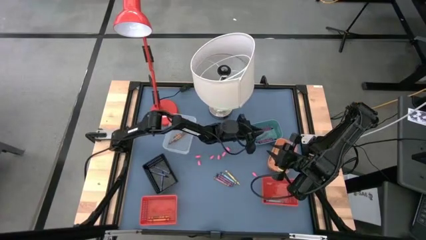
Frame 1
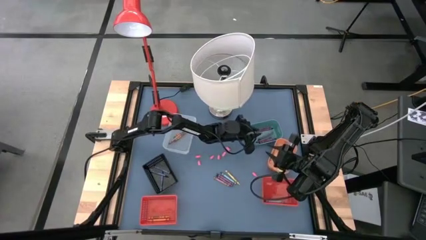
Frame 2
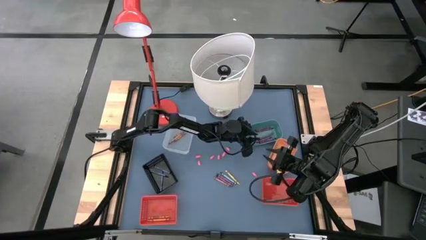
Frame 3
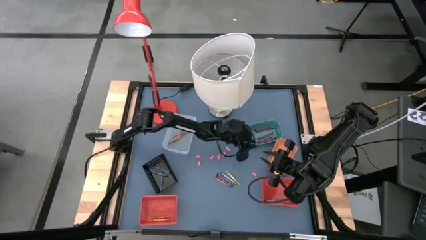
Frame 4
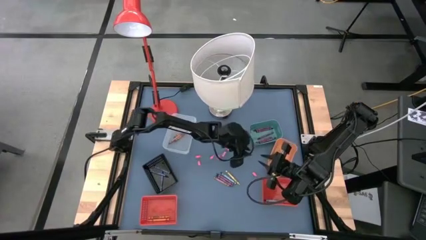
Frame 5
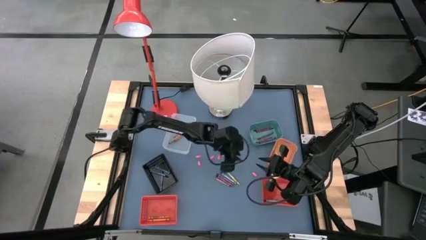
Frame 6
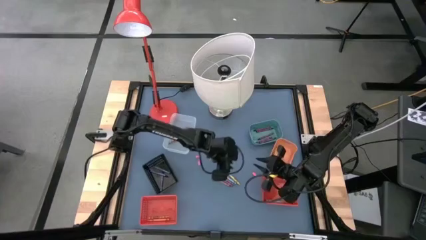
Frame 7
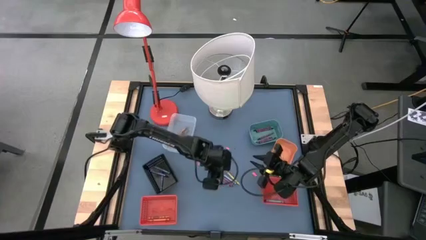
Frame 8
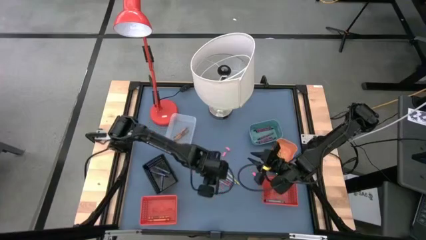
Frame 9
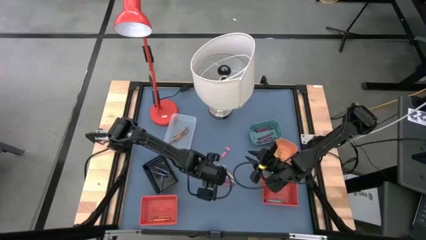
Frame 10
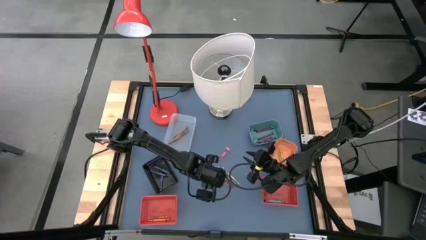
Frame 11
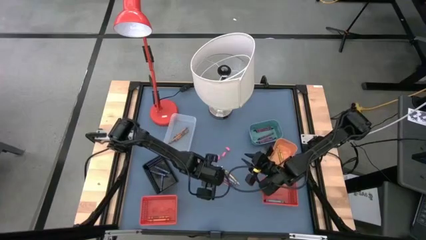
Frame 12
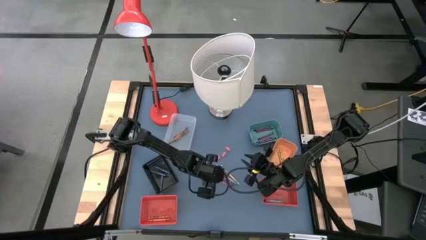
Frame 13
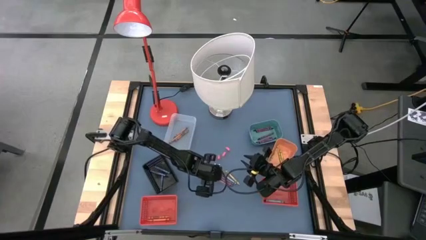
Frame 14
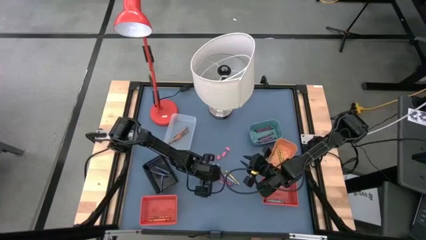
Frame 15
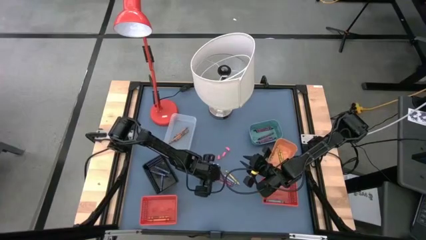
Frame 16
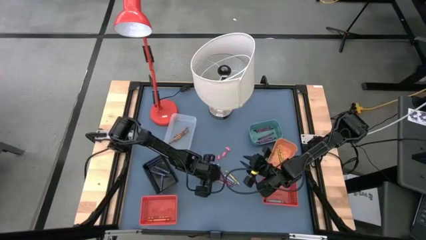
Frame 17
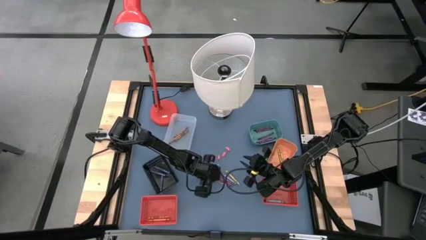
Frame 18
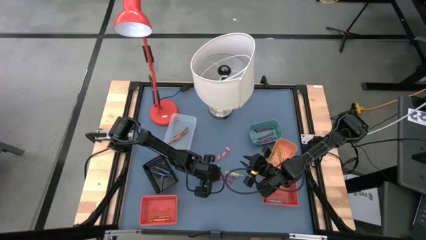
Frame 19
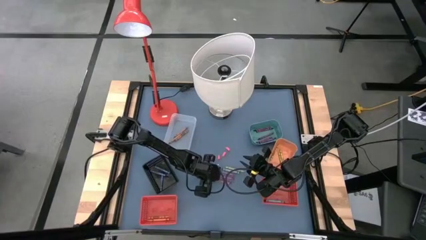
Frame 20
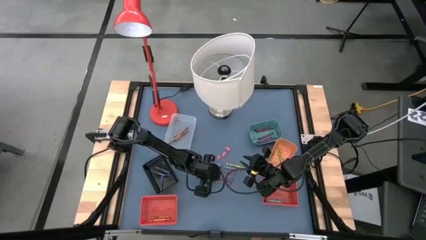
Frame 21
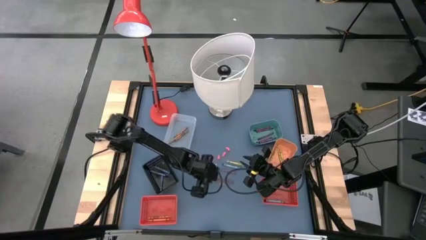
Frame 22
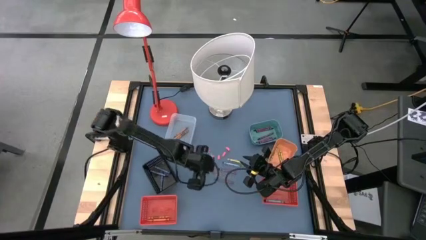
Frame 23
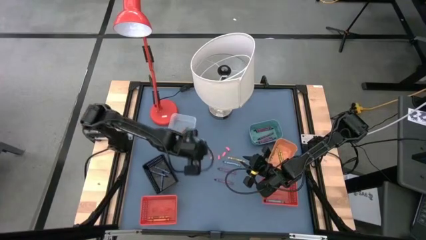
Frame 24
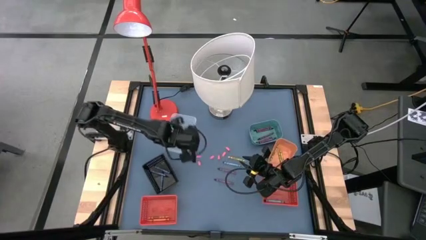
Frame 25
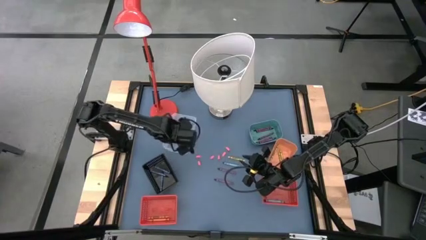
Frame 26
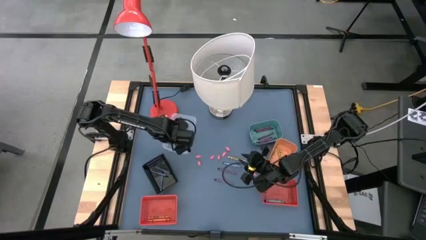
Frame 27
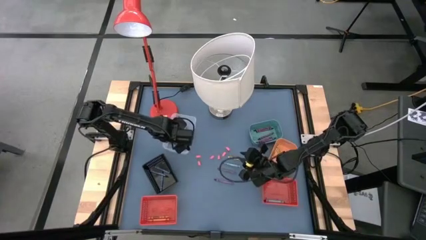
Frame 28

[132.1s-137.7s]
Task: Sort crayons
Put the brown crayon into the transparent bin

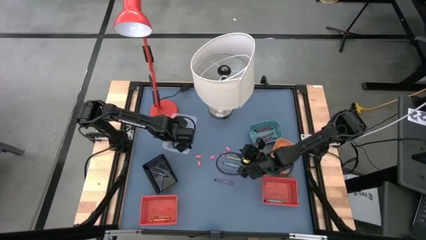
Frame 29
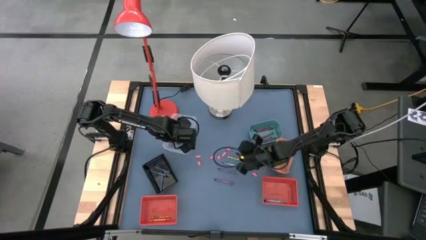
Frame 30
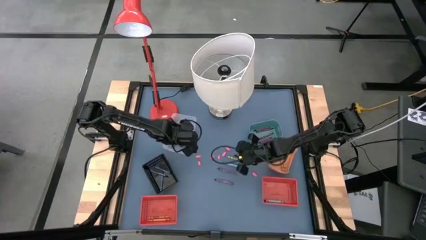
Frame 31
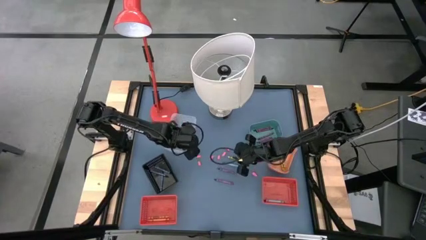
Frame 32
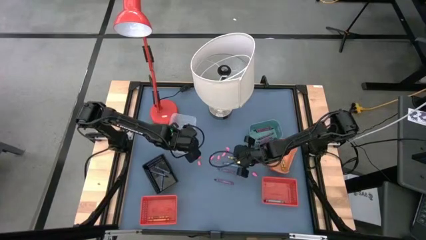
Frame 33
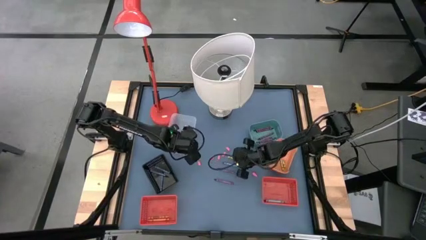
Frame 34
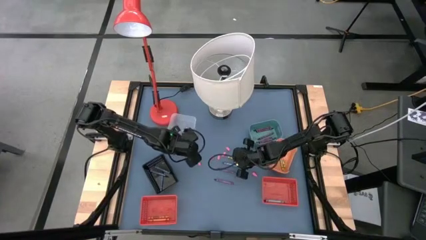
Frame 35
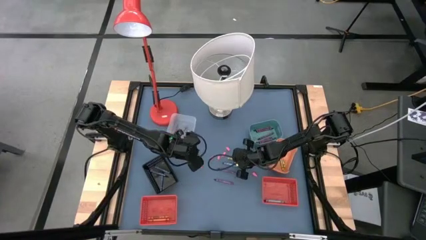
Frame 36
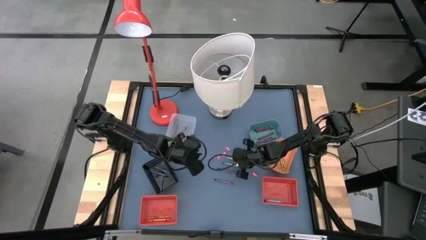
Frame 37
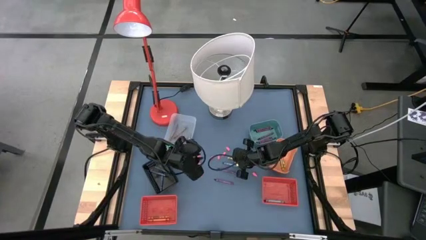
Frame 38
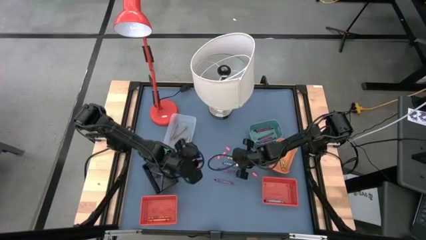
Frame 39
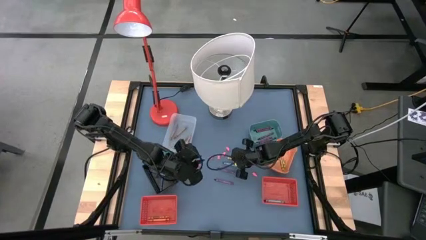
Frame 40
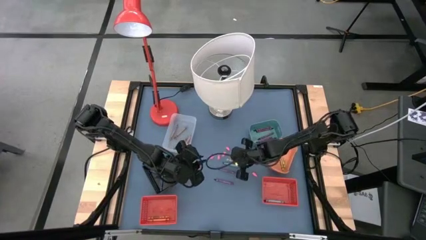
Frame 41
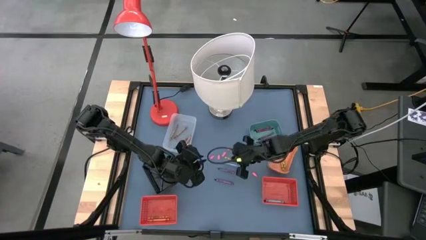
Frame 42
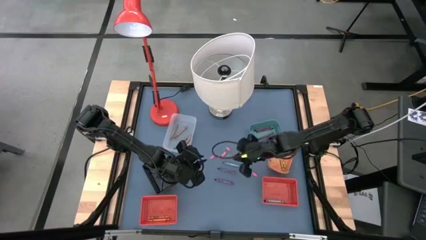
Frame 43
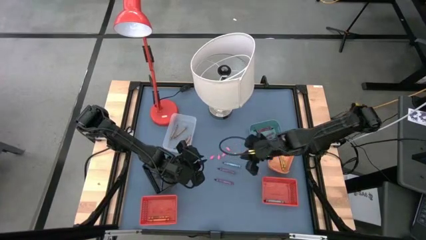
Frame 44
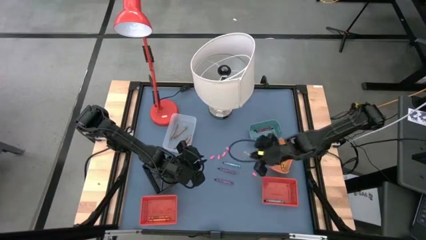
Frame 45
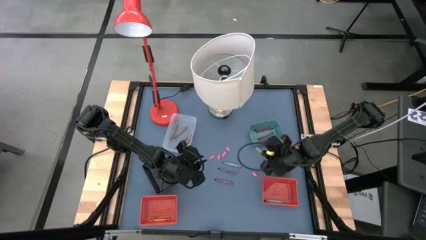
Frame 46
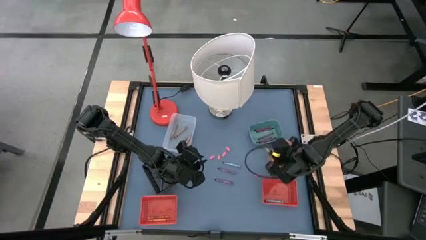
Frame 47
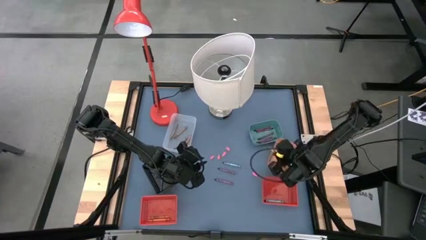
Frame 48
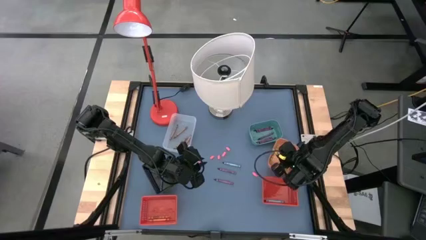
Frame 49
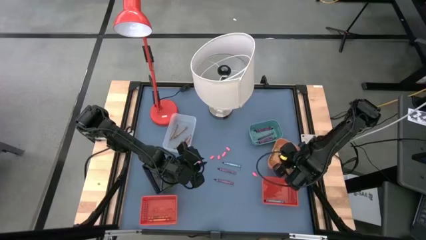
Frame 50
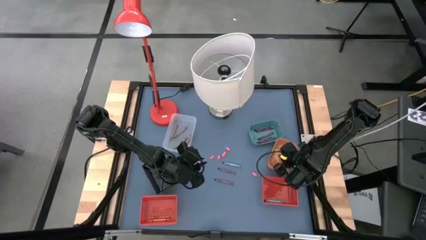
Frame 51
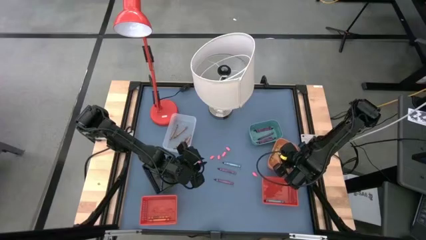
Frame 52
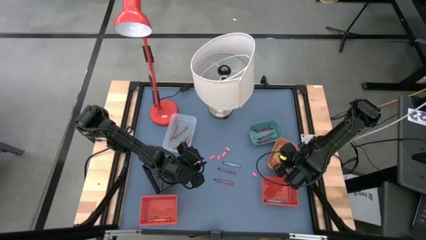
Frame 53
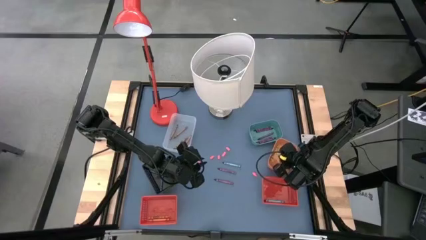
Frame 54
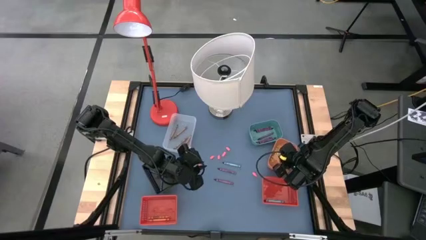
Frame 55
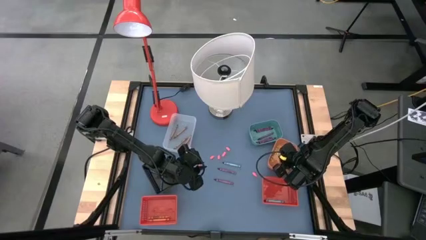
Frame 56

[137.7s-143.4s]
Put the yellow crayon into the orange bin
